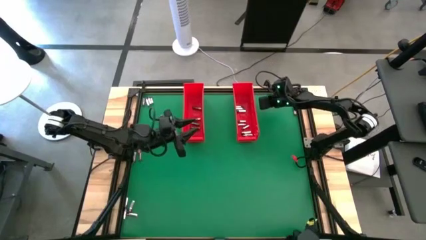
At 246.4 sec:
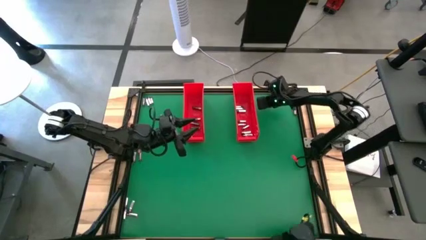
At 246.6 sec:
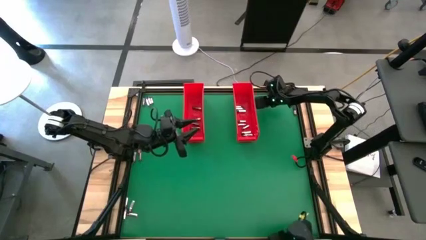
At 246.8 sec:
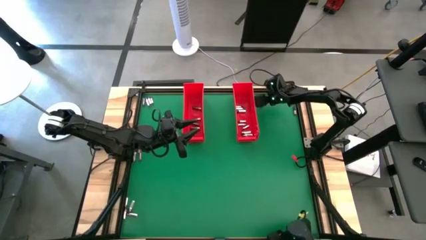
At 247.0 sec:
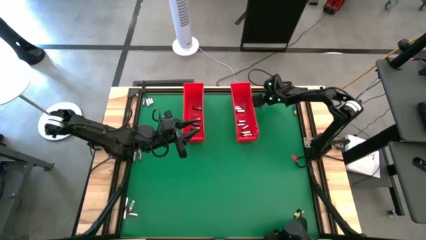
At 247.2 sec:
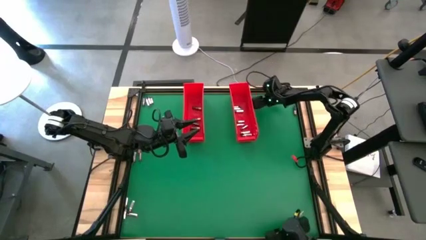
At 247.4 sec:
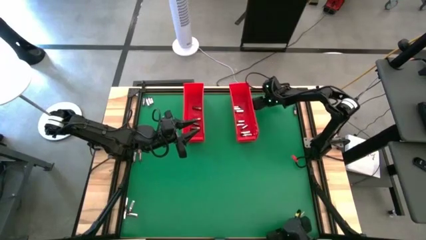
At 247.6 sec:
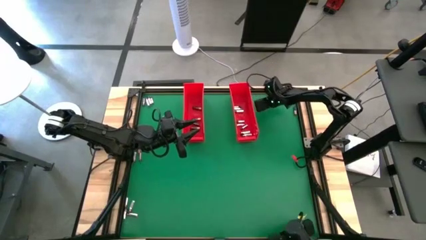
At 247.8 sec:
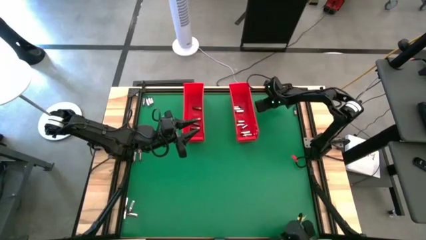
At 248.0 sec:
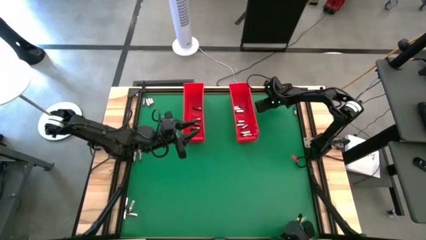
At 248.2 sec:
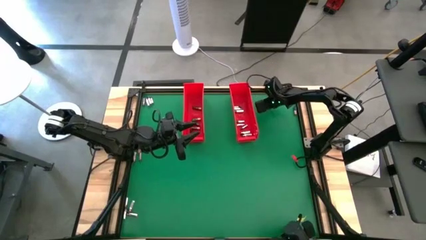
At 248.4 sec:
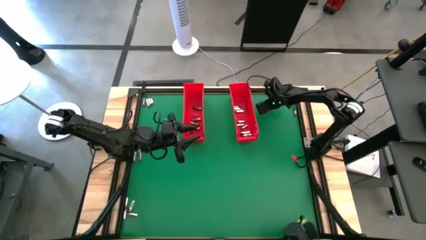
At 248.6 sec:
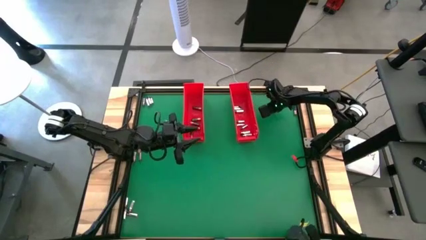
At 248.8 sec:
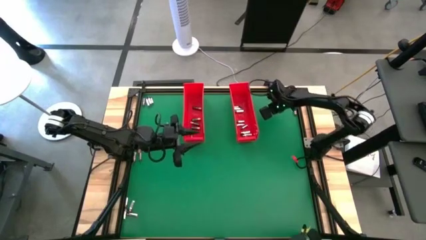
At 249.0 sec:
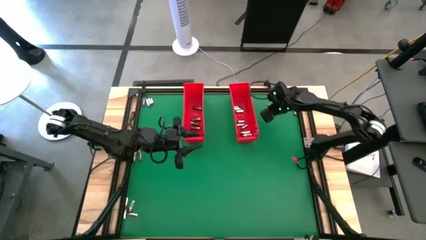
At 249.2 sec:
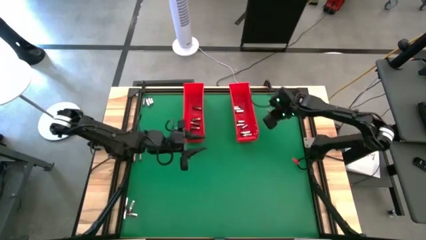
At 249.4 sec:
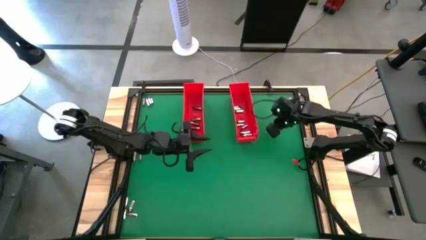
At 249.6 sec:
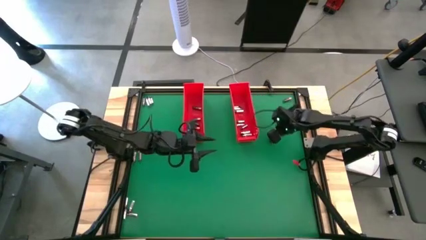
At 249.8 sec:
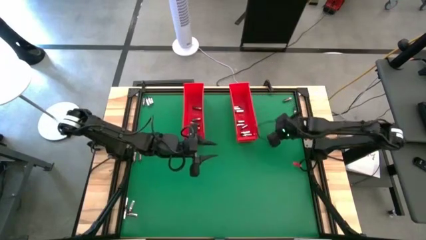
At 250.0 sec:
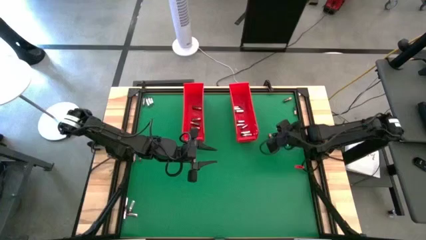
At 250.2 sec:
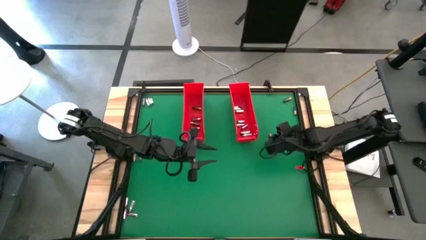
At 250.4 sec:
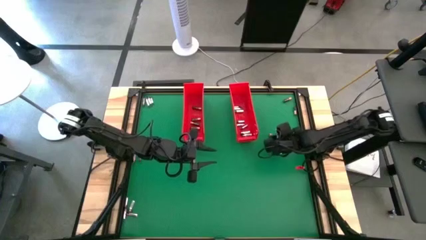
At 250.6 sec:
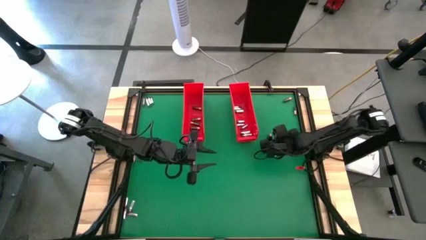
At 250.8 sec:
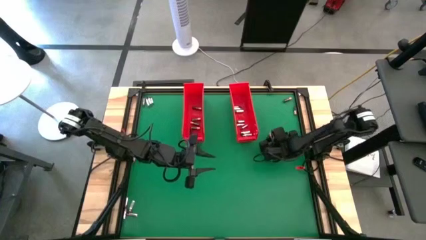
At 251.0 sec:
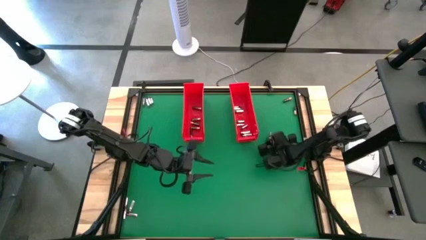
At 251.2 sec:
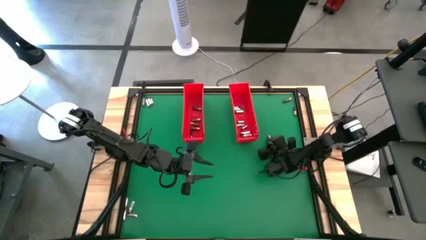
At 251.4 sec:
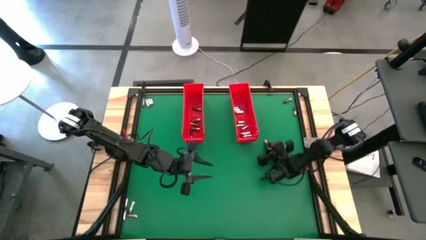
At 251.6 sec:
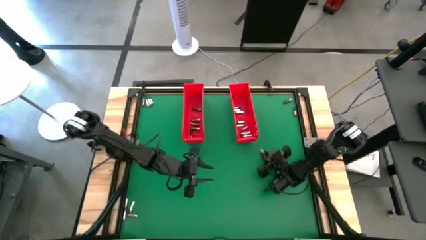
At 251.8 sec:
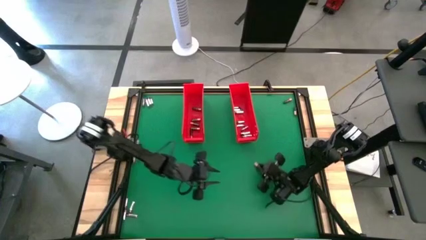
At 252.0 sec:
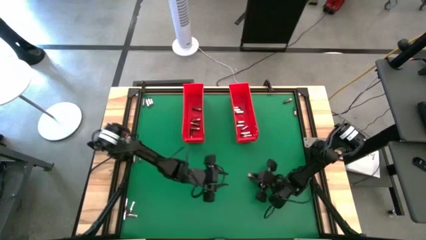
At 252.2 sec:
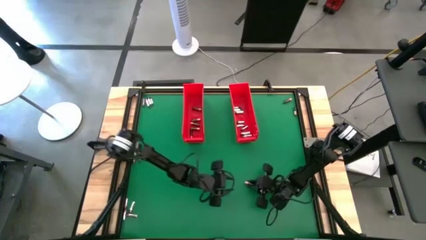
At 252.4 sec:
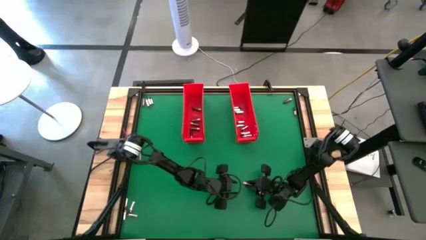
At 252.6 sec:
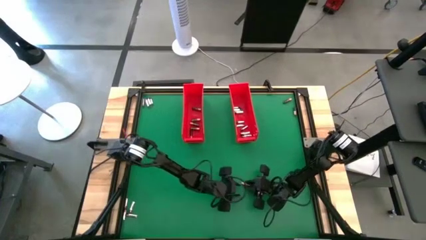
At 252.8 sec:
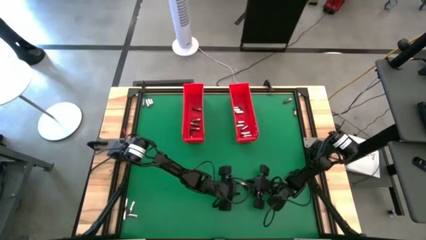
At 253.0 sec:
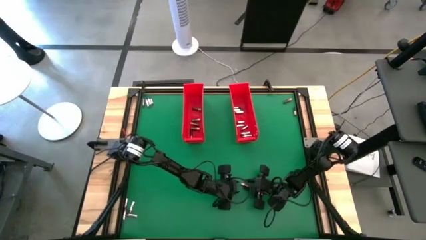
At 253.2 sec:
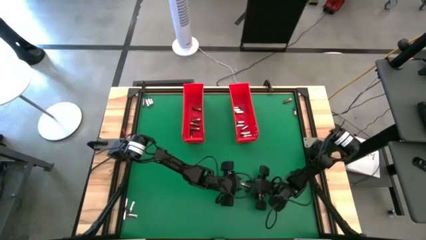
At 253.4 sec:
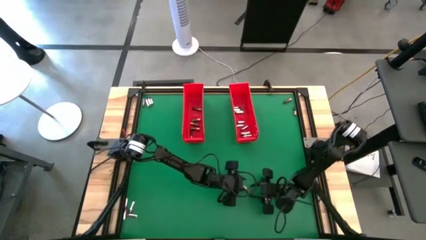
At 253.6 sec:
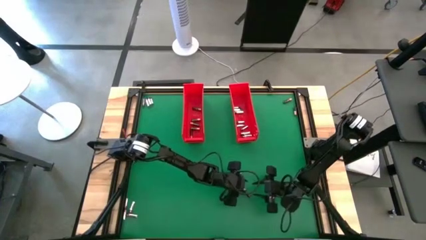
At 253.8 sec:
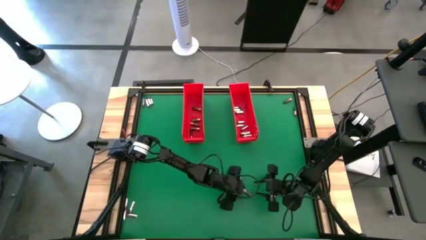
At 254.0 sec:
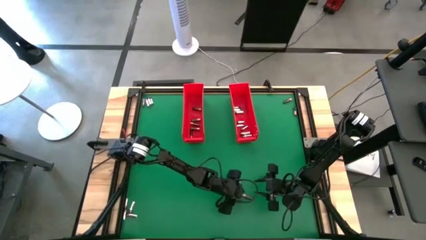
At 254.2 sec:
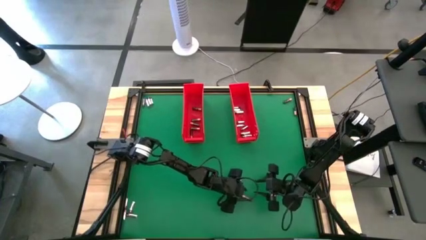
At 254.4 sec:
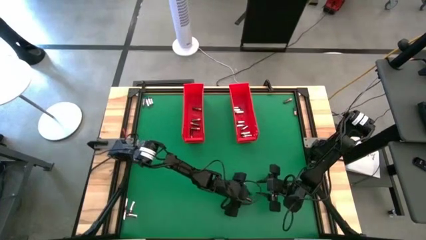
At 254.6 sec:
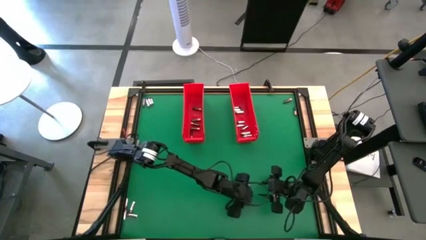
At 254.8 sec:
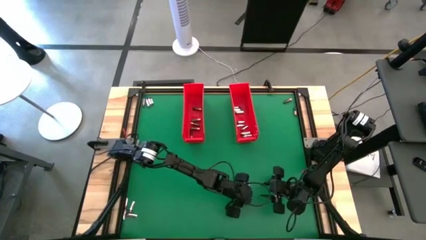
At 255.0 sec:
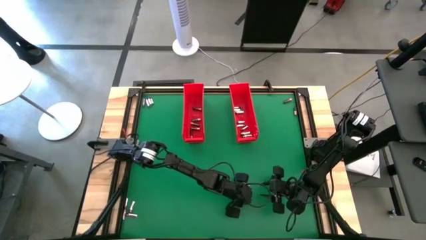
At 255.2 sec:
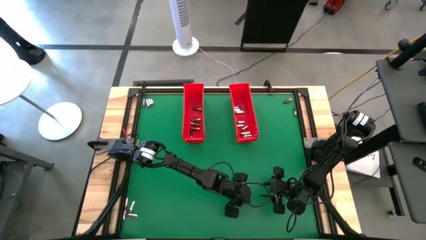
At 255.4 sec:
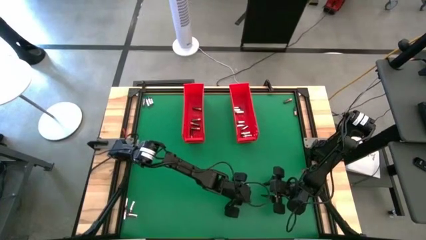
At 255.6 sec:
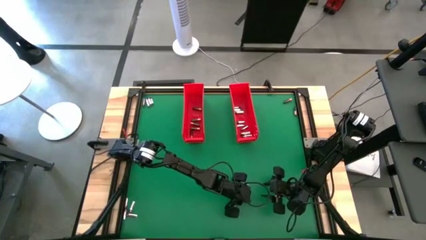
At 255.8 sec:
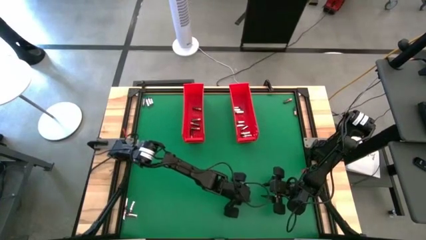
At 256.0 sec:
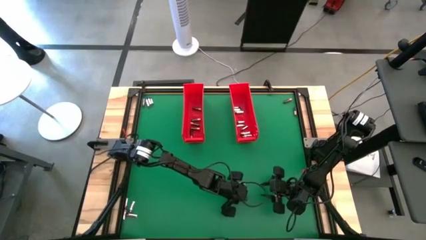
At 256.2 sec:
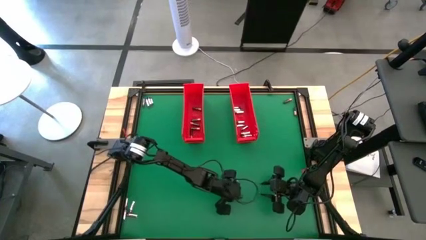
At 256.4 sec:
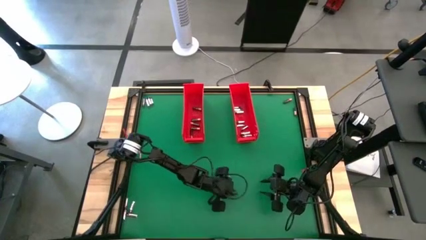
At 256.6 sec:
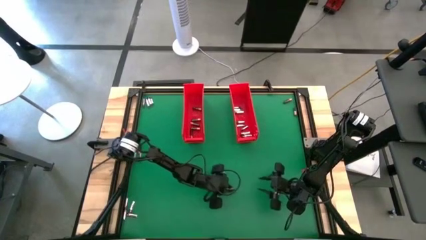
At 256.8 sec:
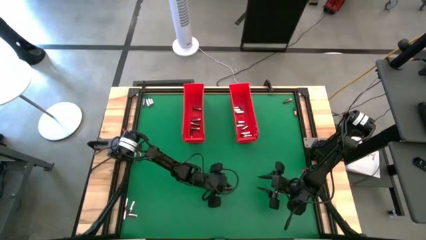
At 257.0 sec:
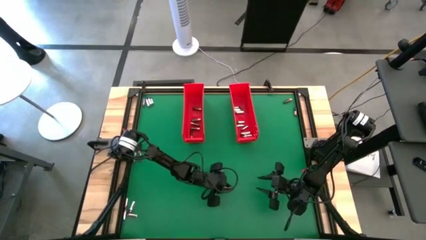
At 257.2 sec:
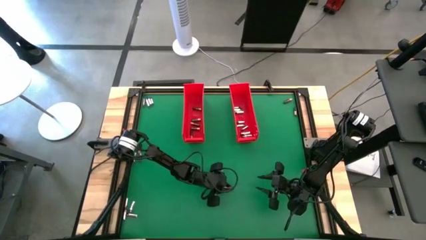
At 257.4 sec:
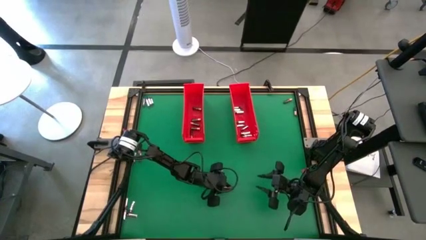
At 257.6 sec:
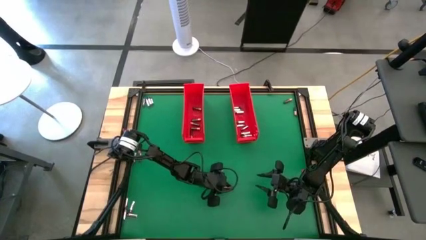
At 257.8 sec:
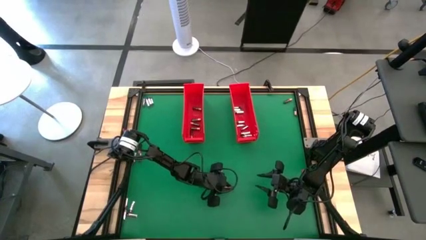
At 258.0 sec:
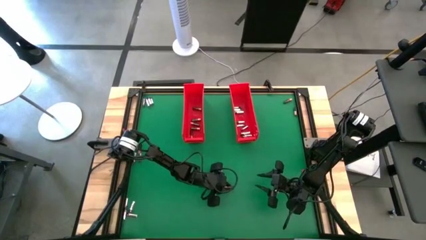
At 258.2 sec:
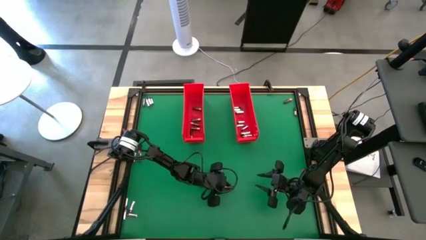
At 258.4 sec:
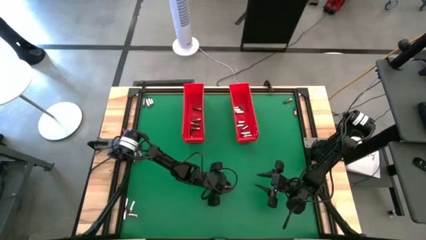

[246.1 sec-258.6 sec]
Task: Sort batteries
Put the brown battery into the left red bin

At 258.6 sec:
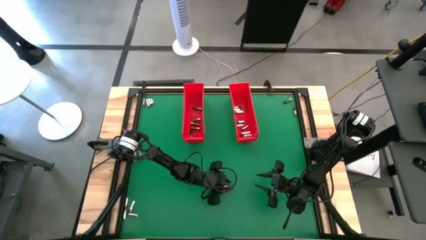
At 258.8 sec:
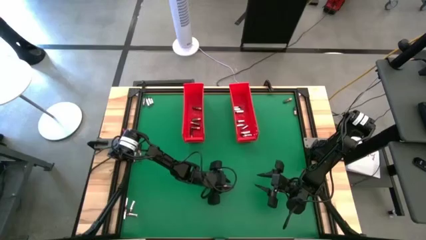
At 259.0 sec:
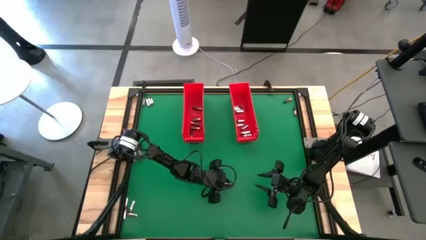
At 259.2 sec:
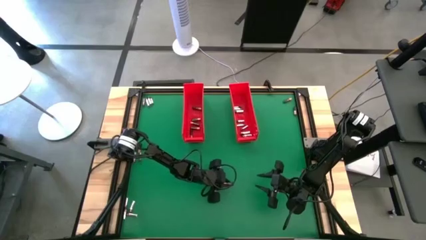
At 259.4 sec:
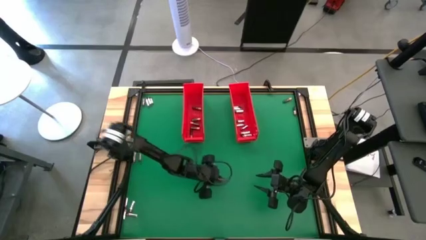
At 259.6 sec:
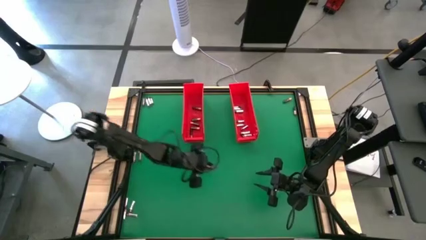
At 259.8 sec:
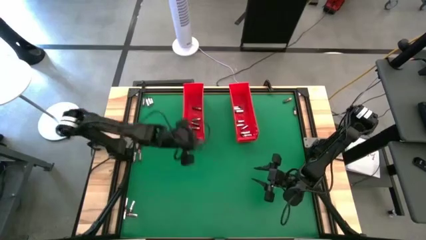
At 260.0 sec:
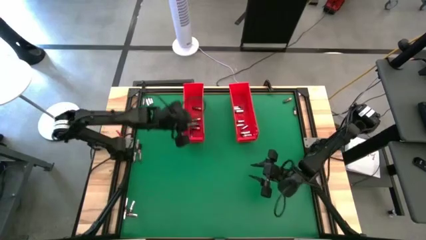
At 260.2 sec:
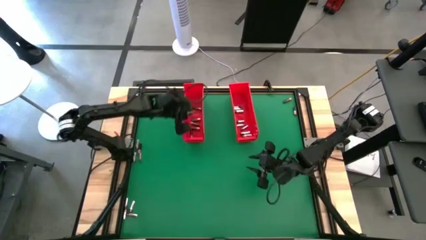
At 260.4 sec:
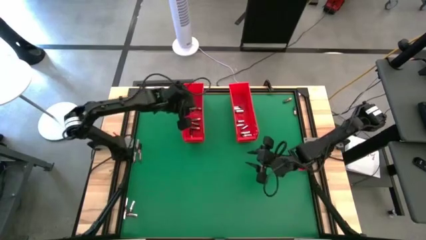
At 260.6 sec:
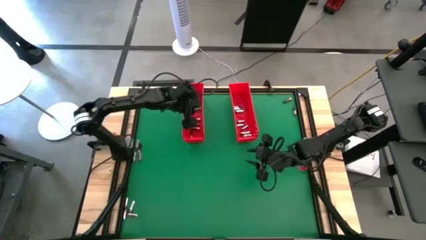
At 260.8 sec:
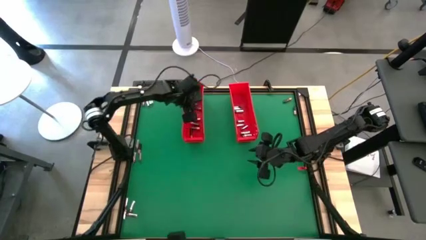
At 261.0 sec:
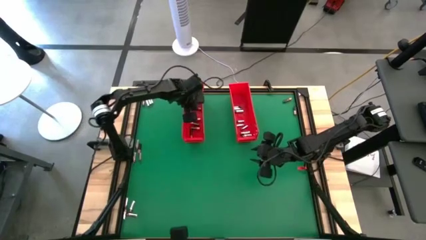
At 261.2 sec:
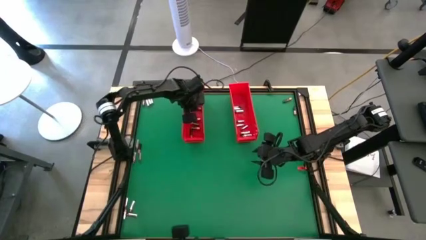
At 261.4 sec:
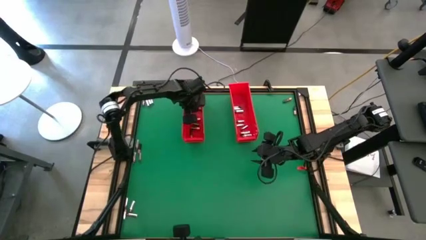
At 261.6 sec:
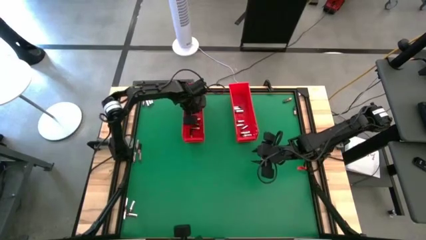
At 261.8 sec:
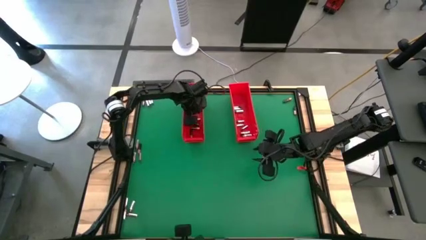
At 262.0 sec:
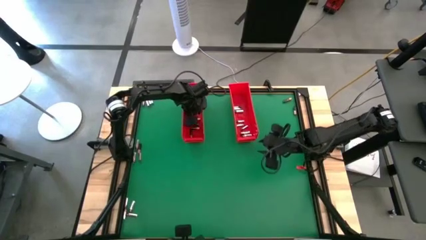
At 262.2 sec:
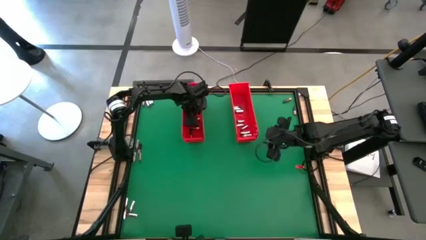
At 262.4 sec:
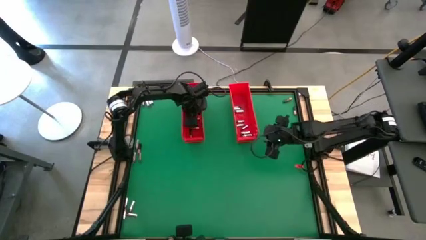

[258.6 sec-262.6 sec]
Put the brown battery into the left red bin
